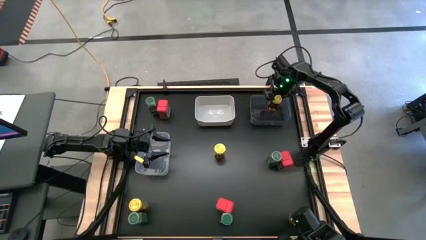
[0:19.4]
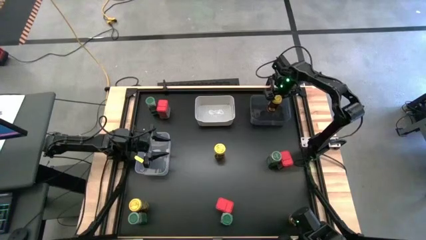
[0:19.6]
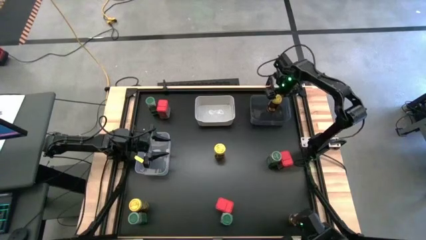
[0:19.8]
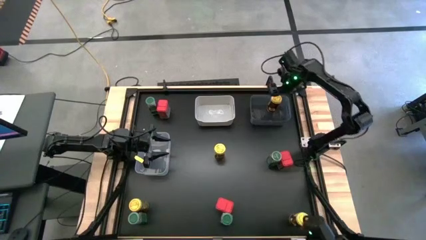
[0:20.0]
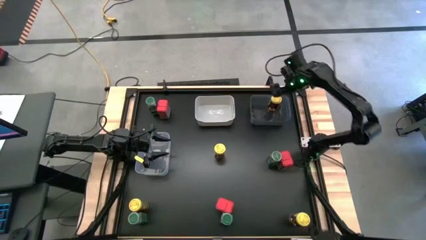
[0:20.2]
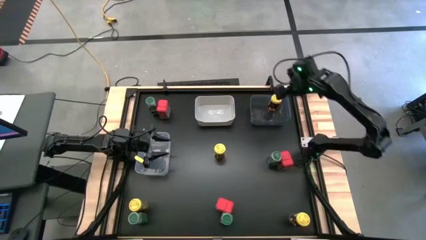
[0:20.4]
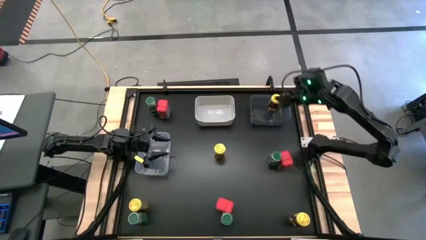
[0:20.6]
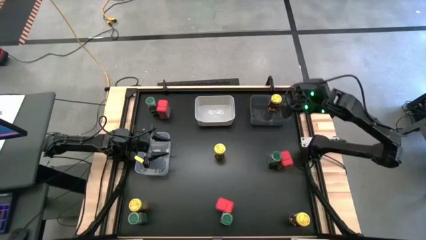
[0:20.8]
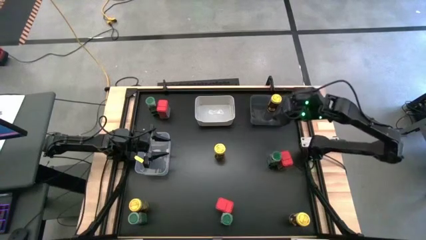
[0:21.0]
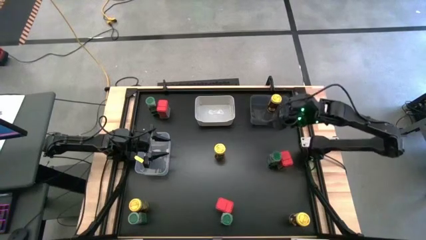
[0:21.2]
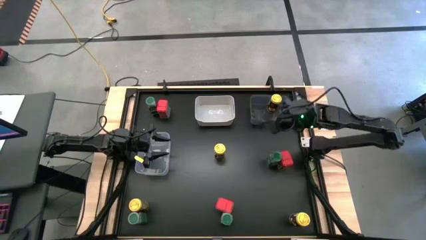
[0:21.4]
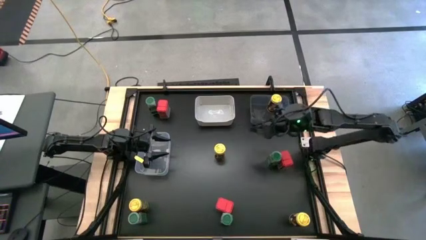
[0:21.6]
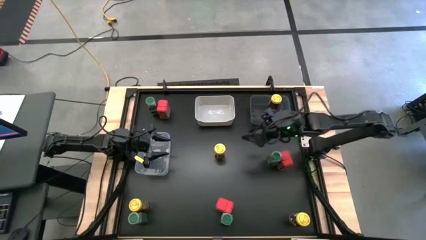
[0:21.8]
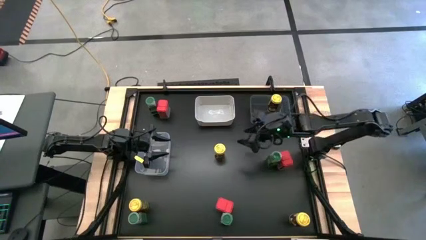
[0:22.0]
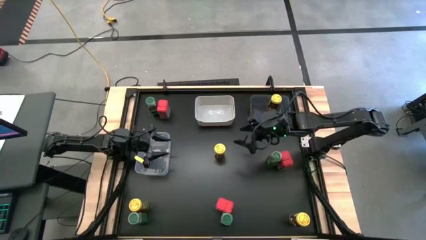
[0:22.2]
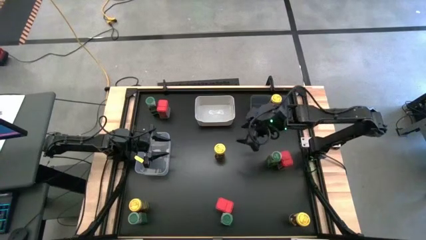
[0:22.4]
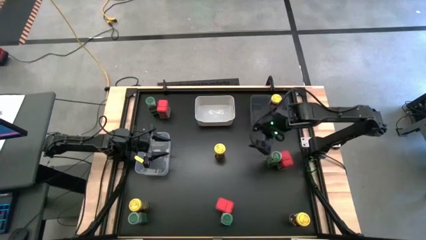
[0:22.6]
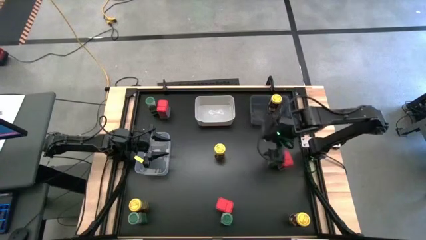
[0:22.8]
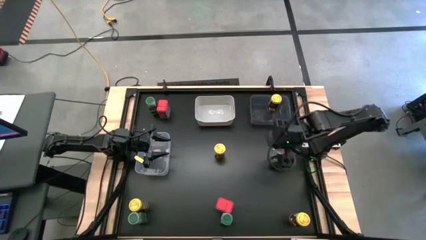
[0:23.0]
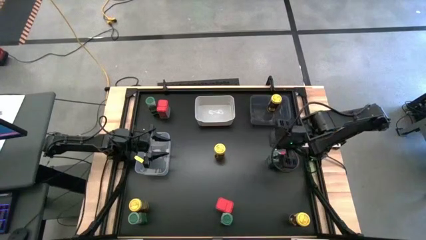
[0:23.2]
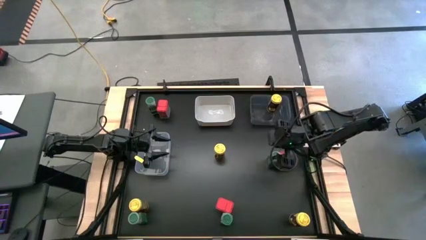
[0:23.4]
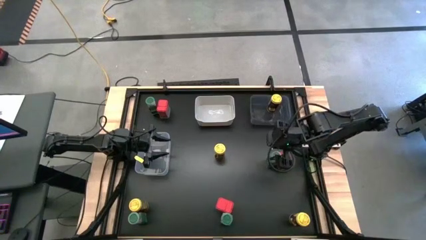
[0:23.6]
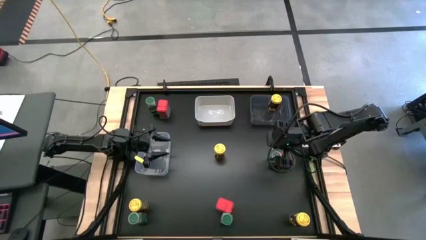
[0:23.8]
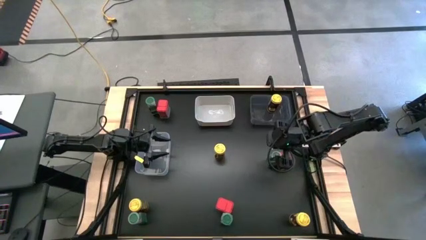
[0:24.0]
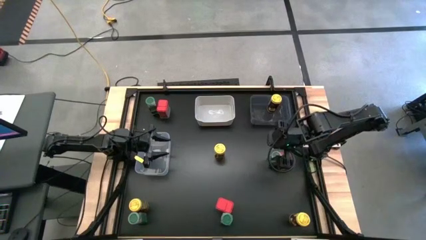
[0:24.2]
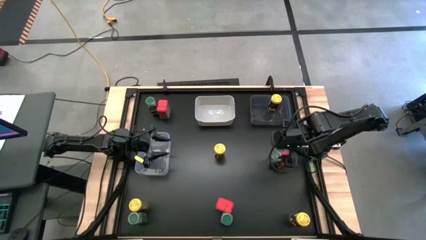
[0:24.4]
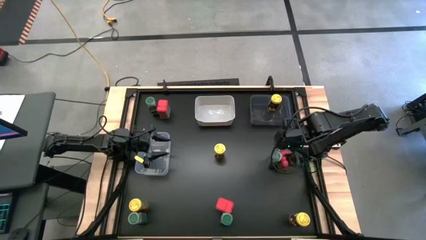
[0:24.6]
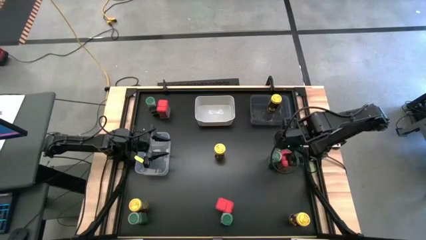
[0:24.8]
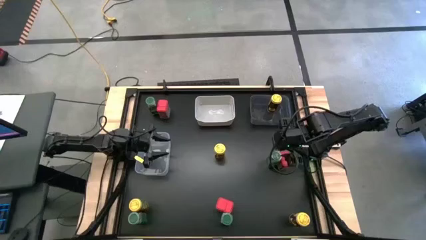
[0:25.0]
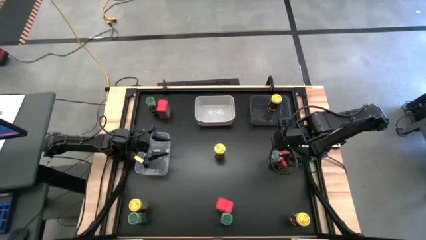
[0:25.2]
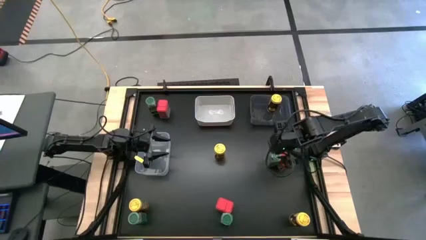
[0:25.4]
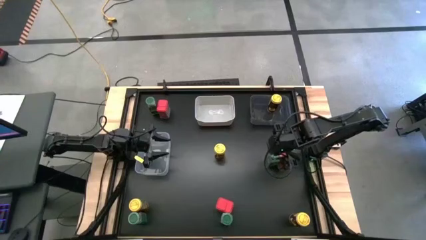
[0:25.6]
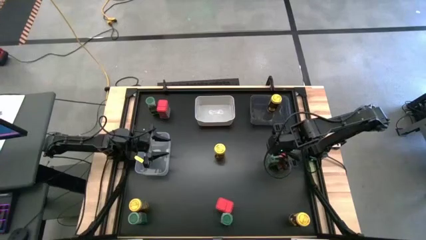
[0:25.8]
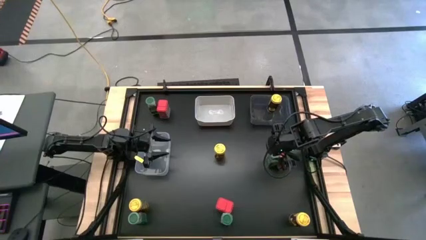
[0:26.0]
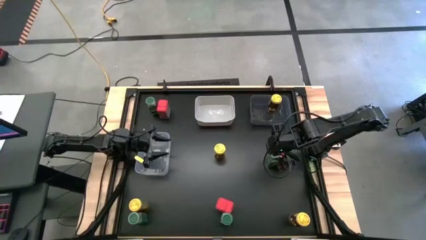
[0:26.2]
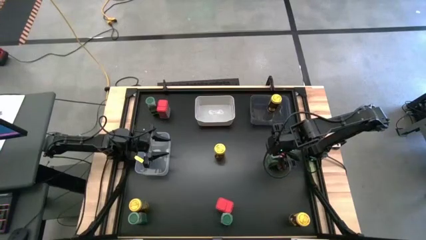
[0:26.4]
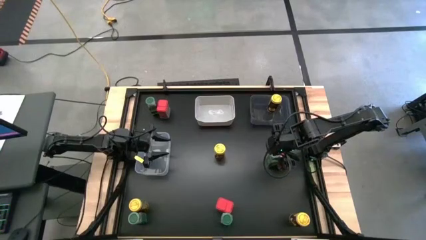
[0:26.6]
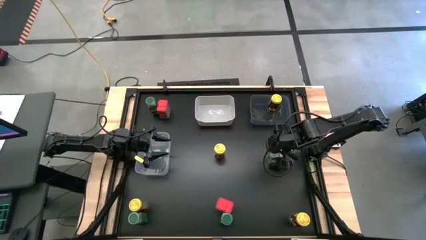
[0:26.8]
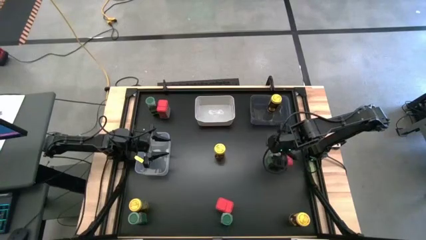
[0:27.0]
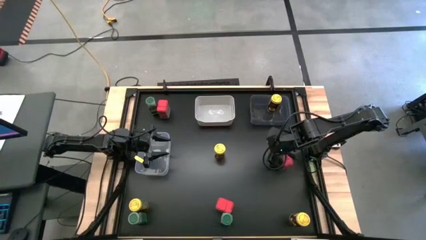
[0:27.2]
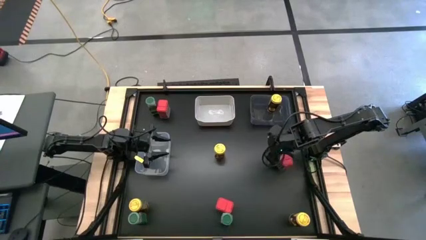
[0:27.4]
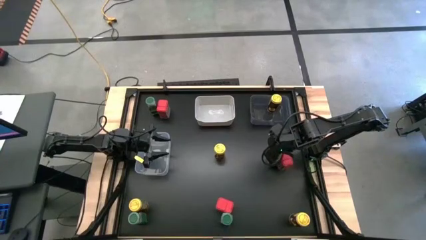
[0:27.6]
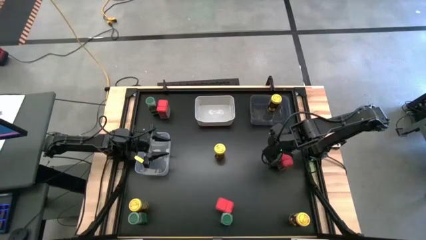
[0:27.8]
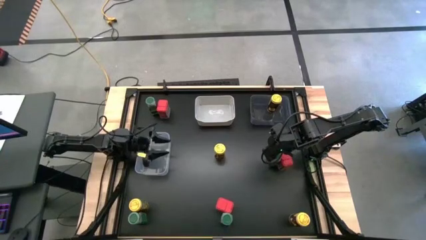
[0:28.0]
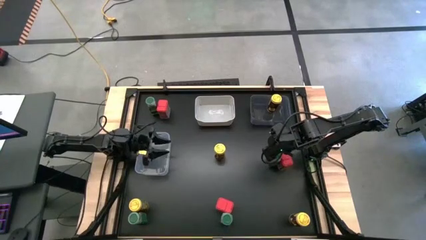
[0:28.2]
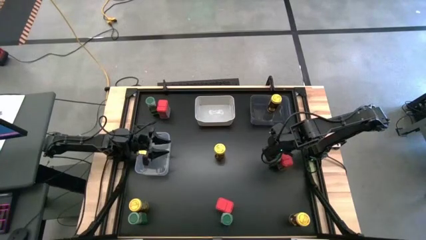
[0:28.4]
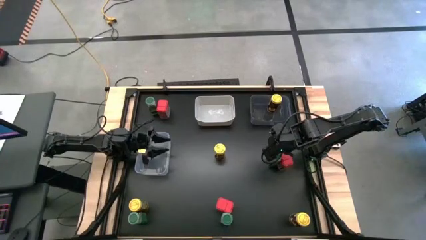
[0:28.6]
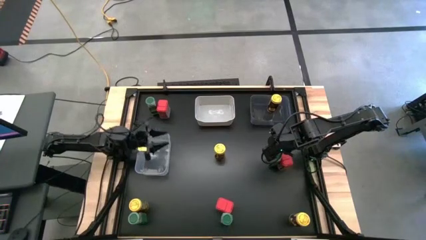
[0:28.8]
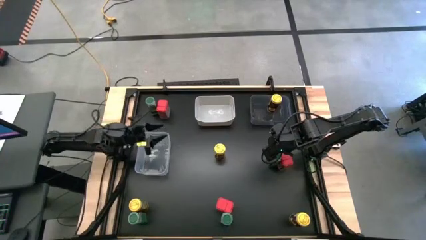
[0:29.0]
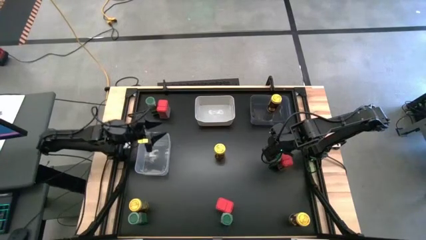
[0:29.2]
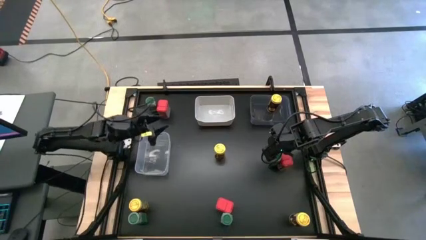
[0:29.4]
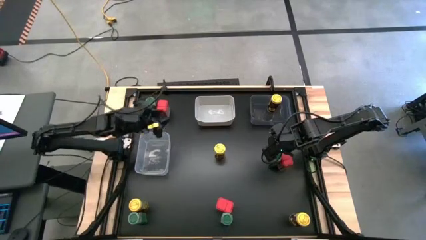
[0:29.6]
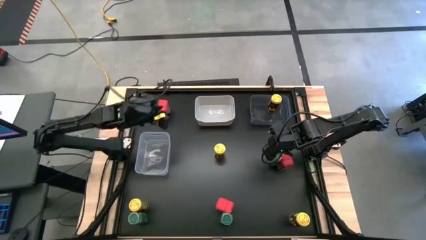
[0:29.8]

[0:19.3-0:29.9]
Task: Sort spices by type
Put the top left red seasoning can into the white bin

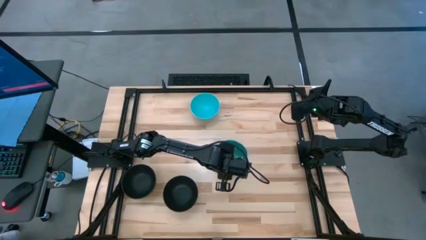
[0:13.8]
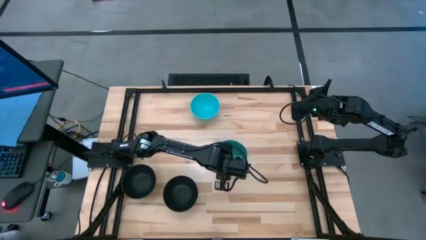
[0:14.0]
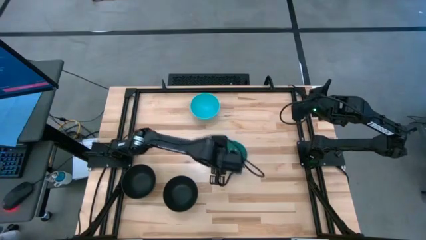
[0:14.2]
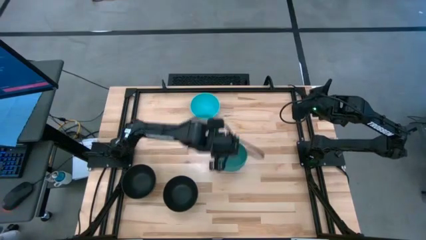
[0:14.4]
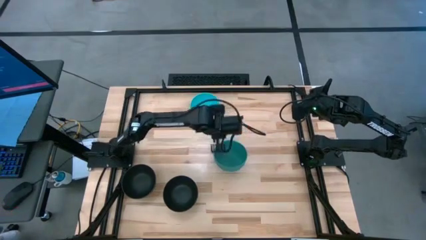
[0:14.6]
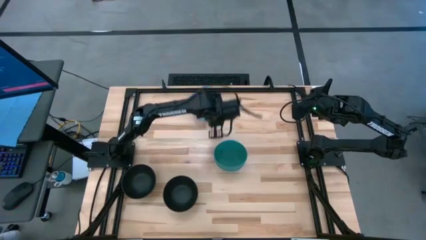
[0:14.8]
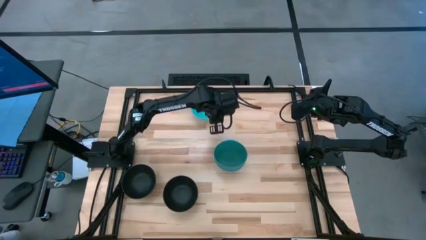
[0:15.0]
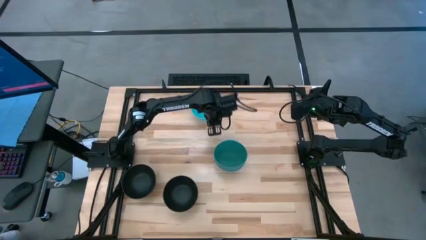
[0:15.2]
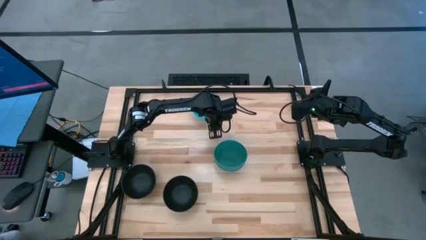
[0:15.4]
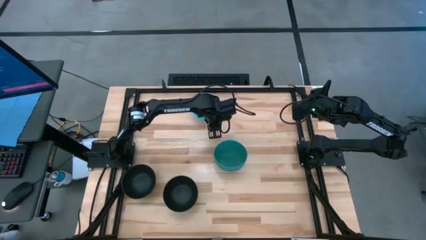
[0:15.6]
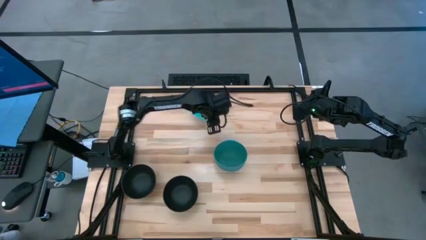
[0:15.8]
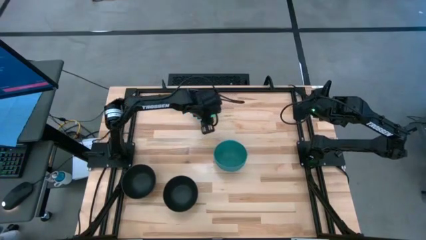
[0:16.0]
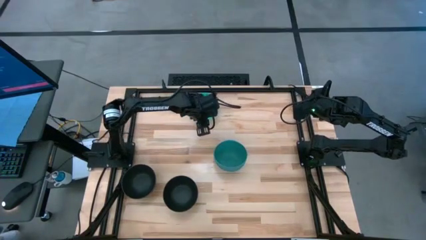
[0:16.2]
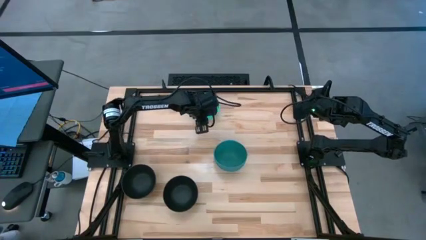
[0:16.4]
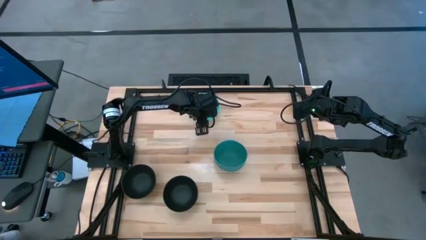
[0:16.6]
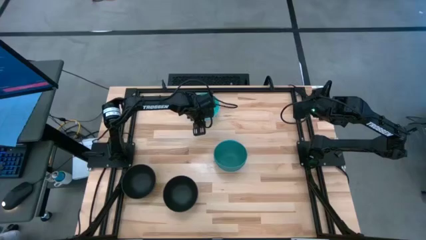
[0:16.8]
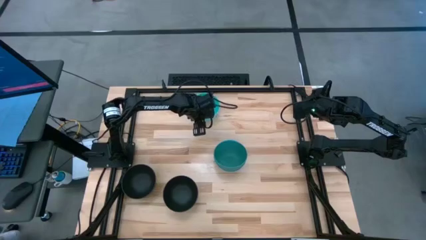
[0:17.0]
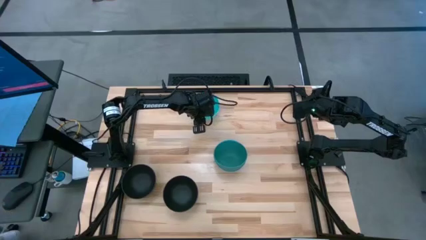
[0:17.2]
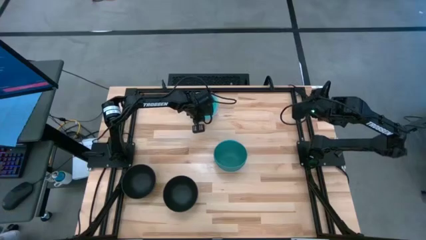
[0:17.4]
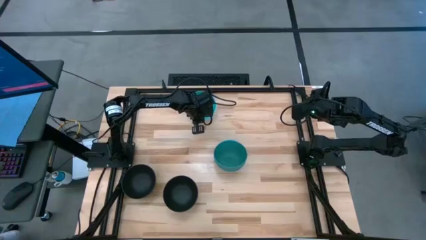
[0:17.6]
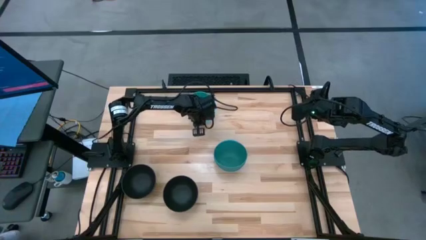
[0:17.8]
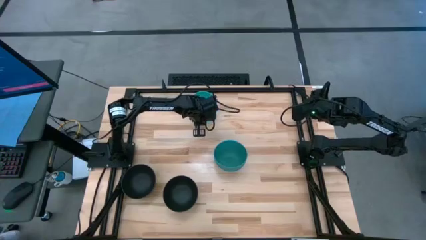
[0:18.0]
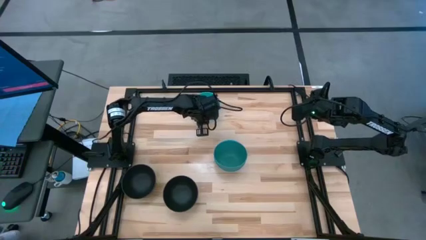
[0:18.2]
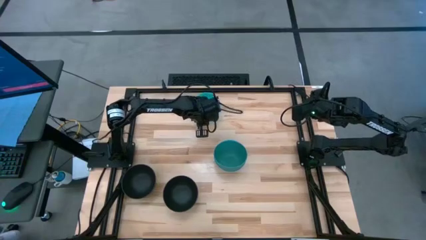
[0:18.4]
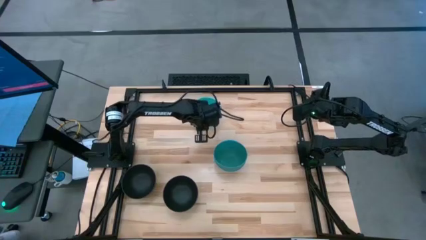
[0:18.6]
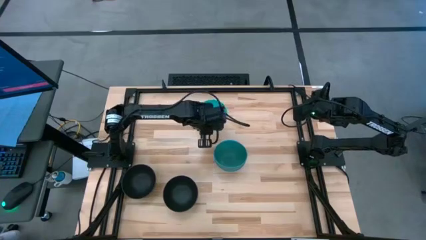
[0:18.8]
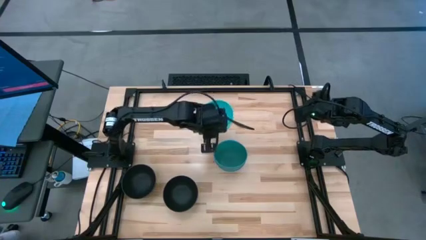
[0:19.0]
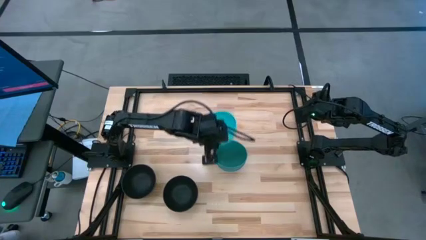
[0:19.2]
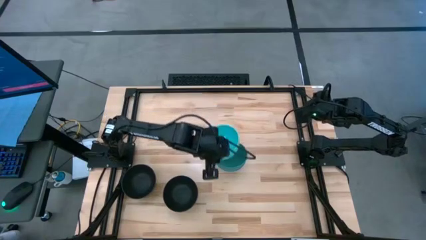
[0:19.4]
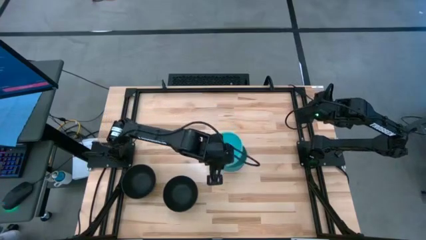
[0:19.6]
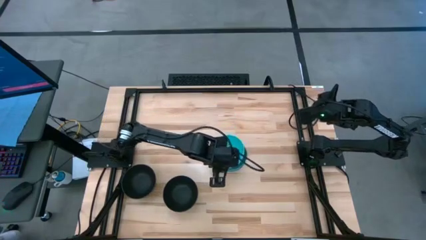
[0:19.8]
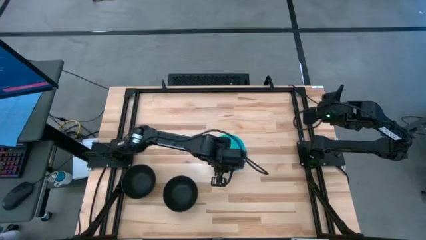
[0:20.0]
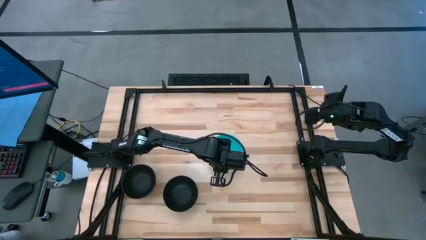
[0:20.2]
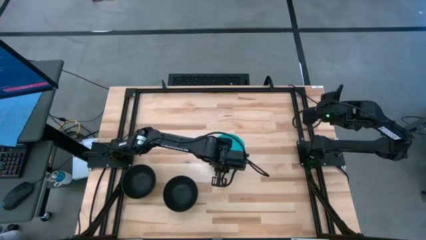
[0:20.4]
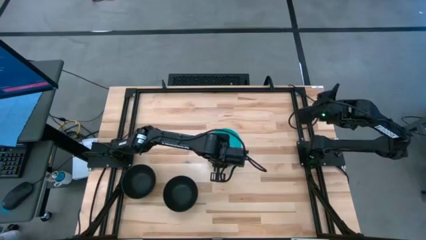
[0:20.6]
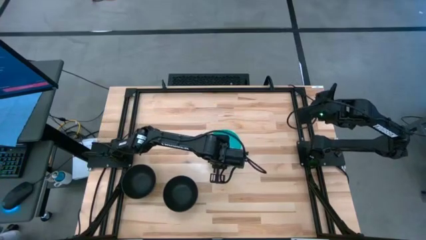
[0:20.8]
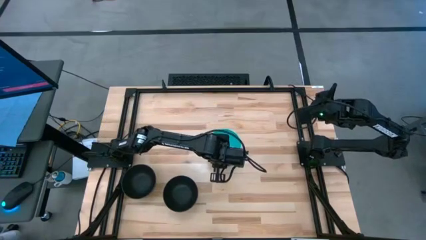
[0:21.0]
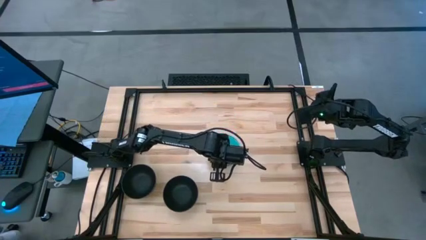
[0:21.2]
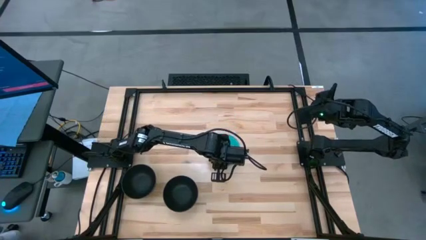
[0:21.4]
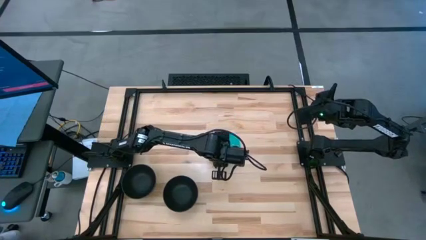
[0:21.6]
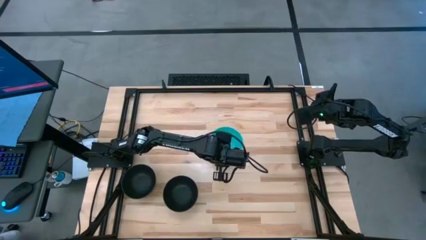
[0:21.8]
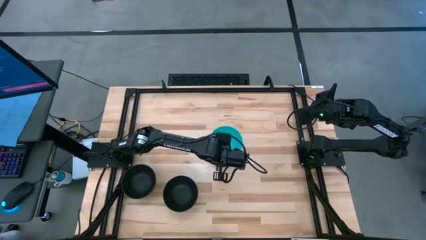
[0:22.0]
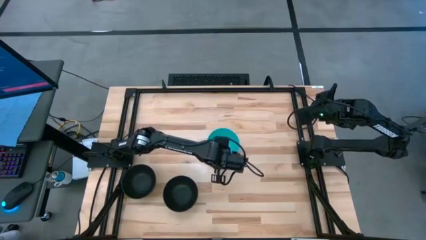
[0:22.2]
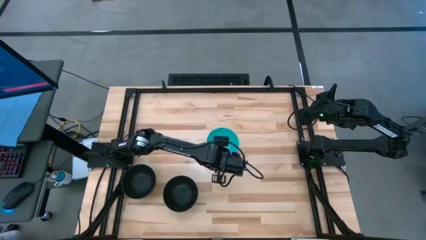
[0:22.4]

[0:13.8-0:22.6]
Task: Nest bowls inside each other
Stack the light blue bowl on the green bowl
